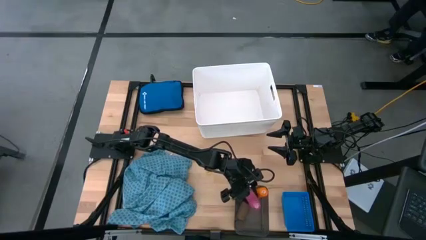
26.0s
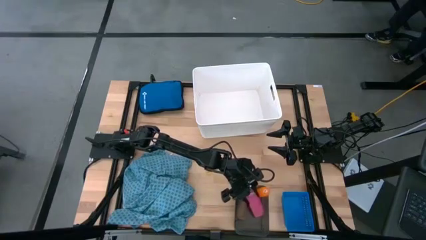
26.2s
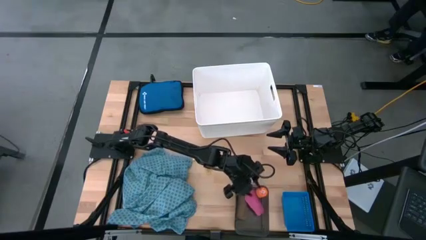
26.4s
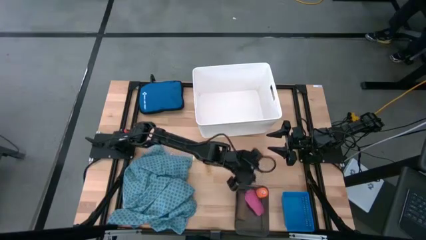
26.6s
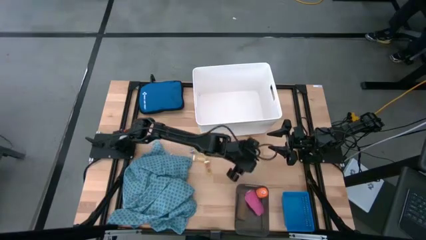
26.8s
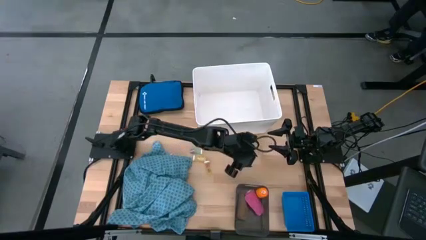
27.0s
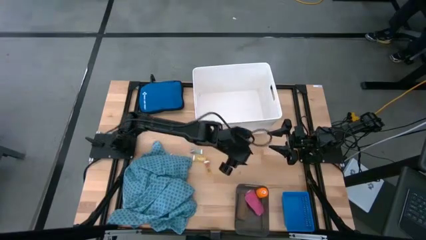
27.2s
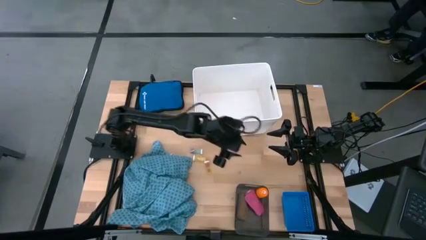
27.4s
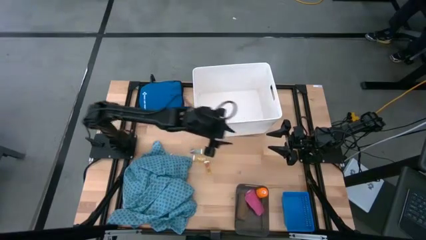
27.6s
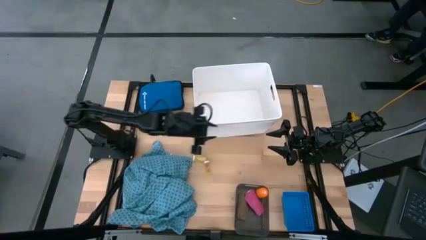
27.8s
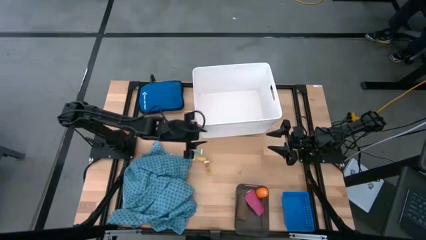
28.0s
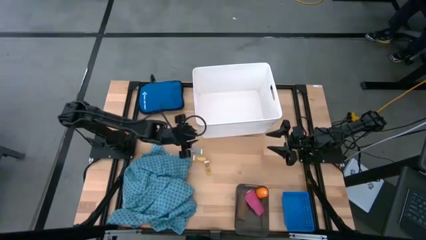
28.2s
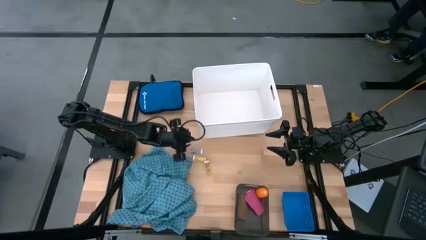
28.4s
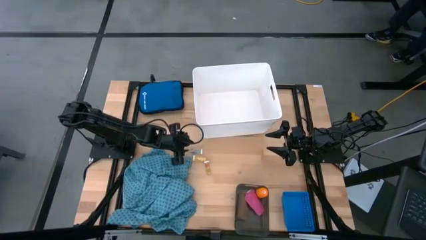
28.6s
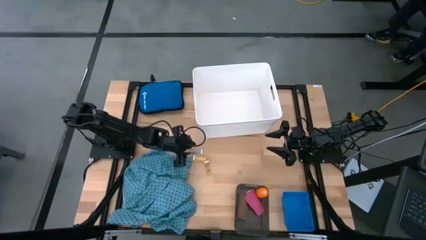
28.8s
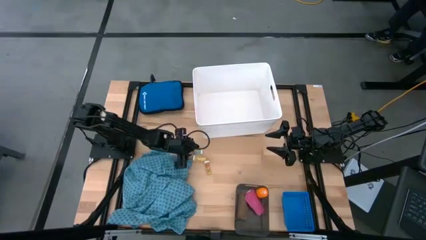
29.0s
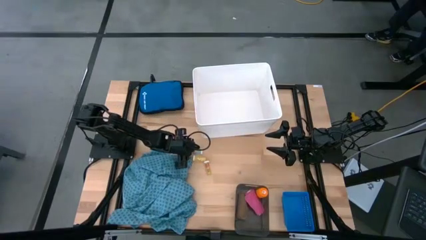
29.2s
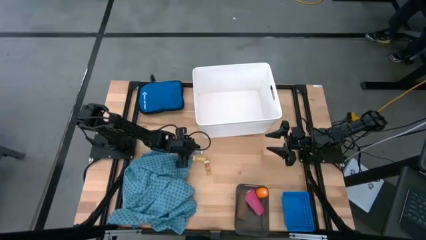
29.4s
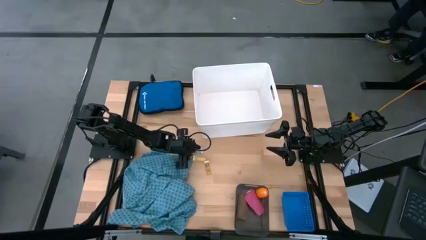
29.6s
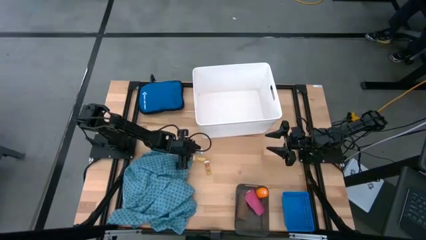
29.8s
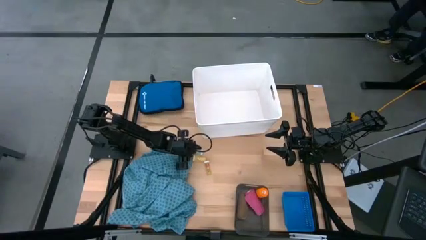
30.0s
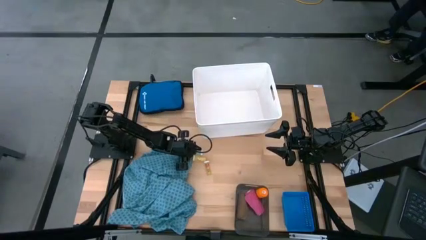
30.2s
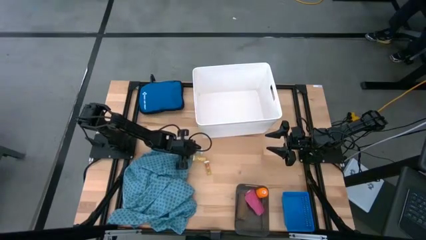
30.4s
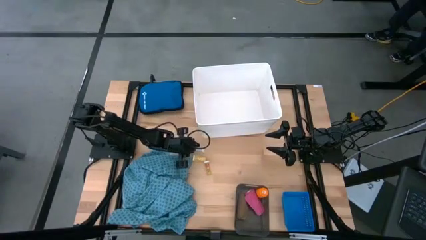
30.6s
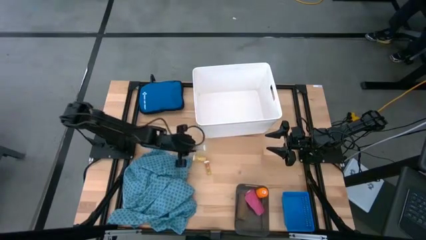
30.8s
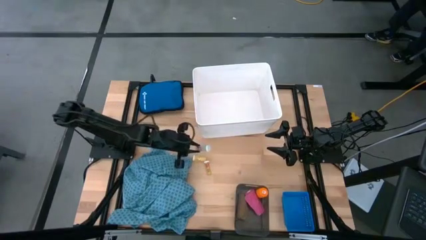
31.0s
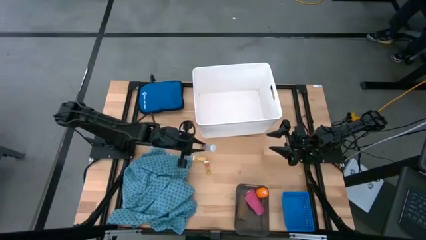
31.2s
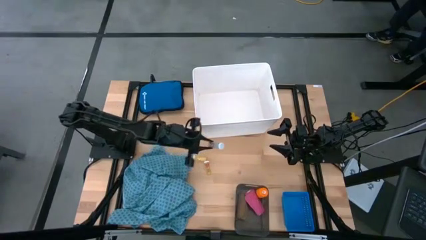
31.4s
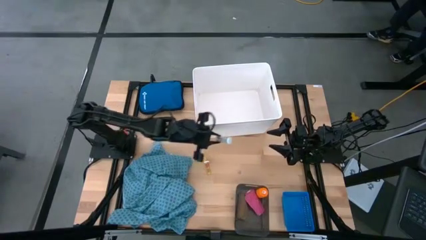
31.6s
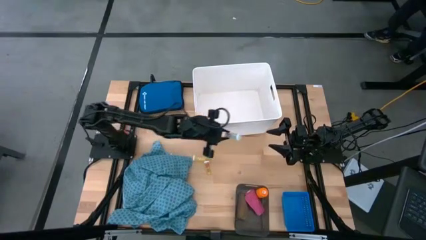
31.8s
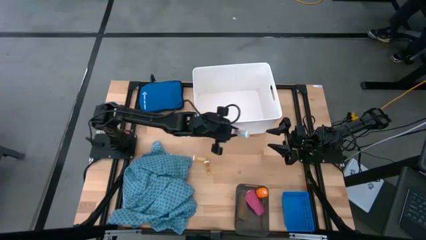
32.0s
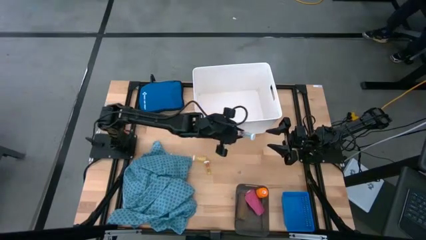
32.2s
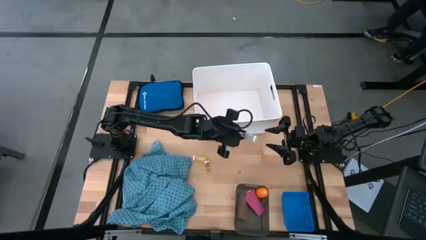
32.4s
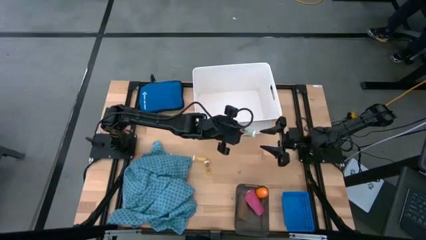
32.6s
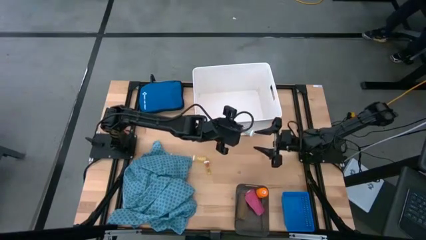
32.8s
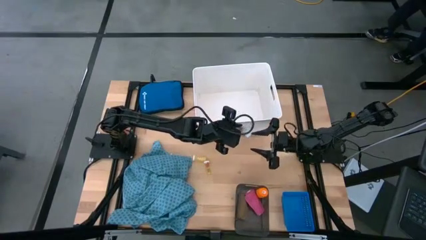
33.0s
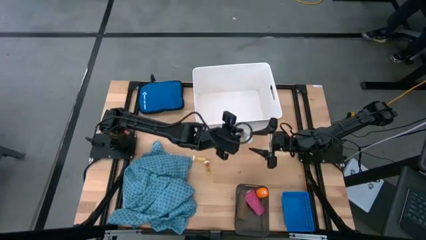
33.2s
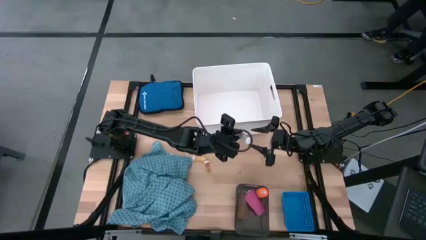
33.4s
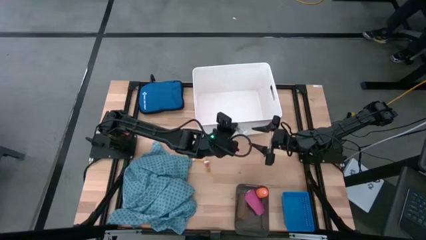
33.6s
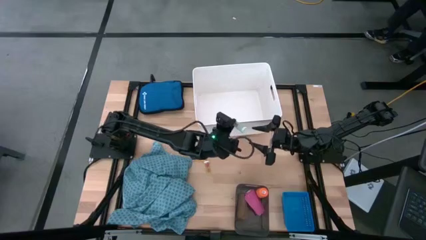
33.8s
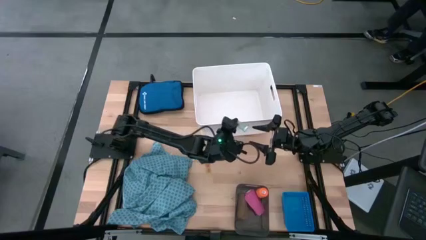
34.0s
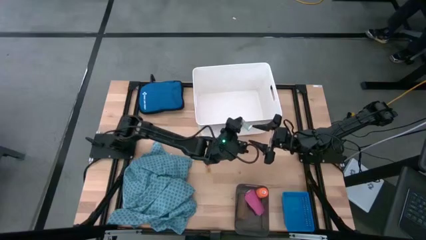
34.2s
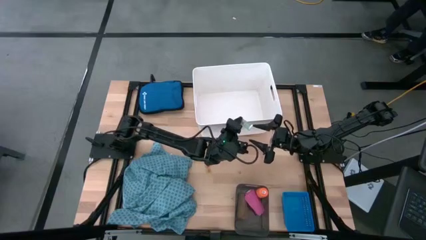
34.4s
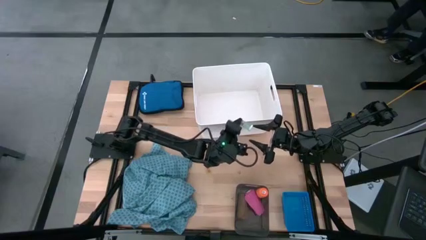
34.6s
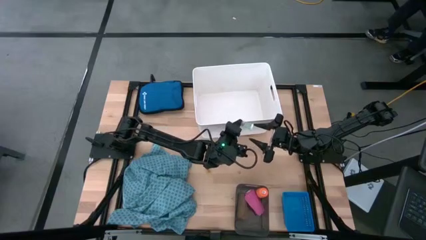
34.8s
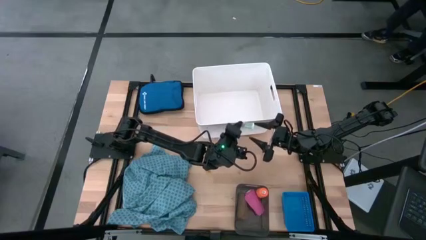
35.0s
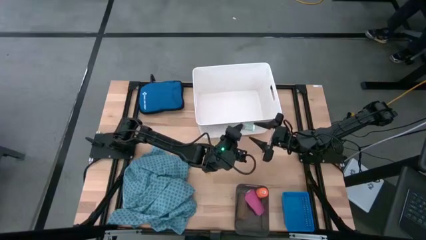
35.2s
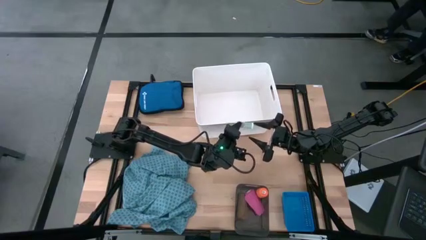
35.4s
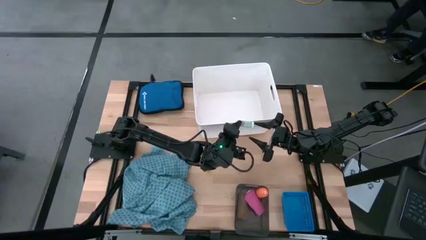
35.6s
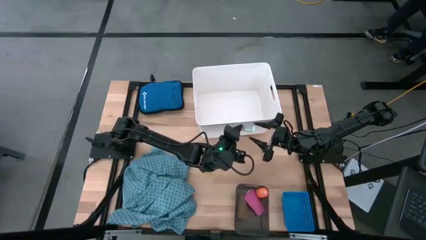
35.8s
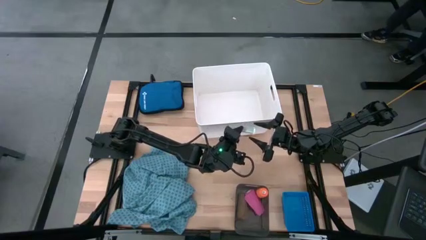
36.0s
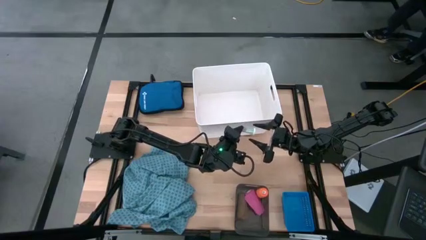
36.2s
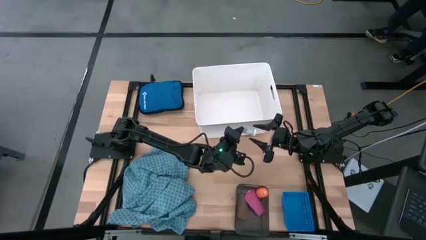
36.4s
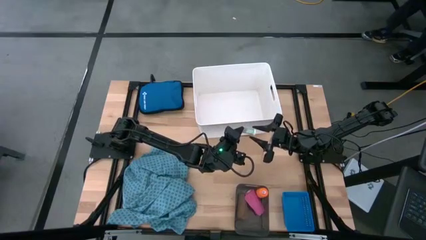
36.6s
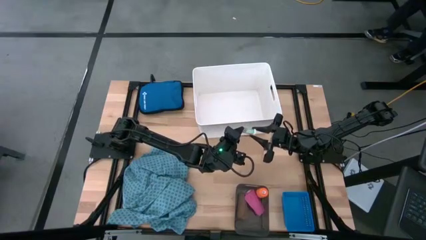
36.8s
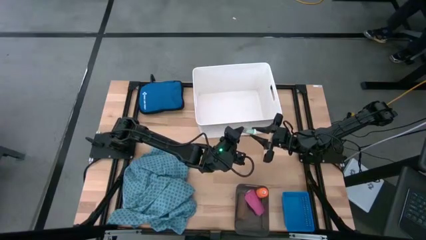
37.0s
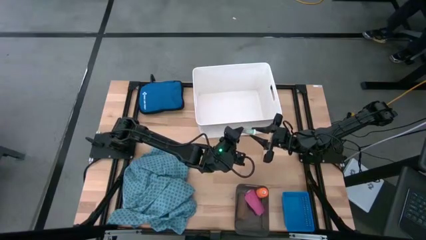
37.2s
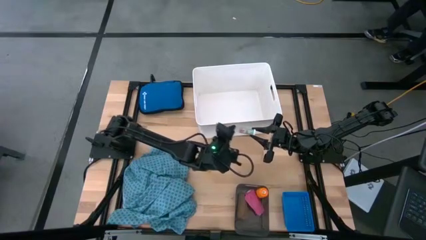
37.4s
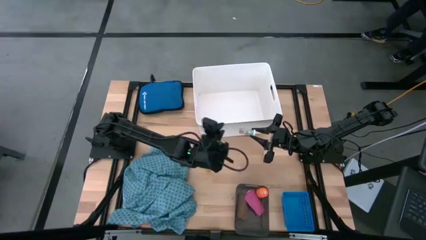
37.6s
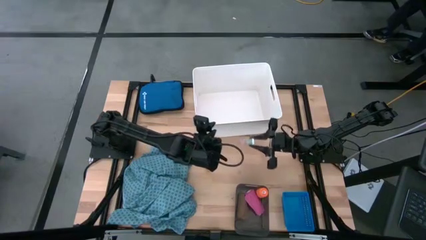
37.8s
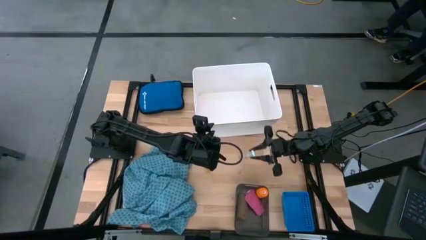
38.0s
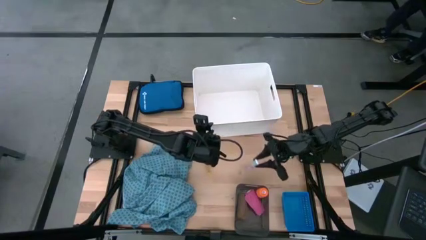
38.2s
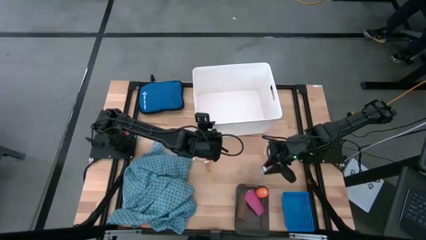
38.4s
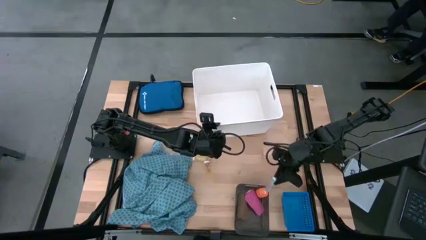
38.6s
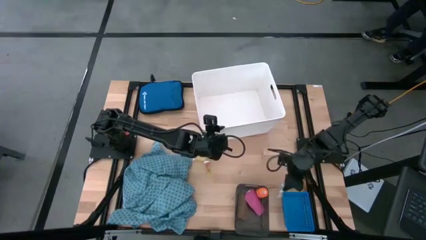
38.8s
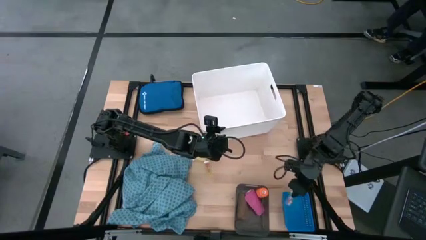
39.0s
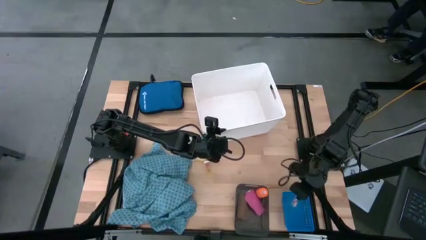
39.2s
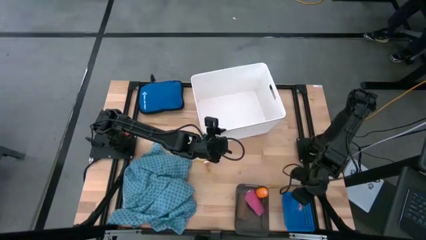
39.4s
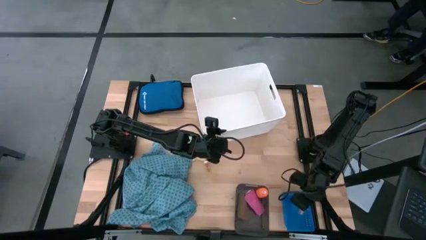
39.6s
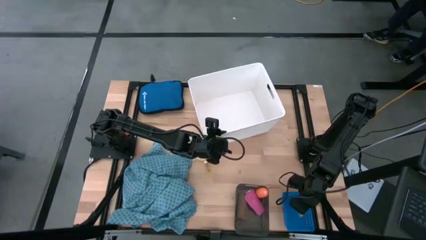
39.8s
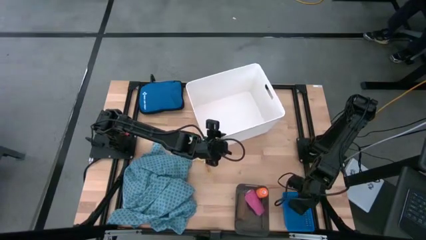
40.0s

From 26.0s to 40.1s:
Task: Pick & place medical supplies in basket/bin
Put the green pill bottle into the blue bin
